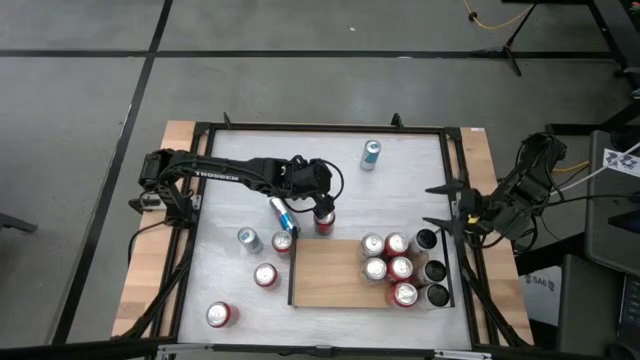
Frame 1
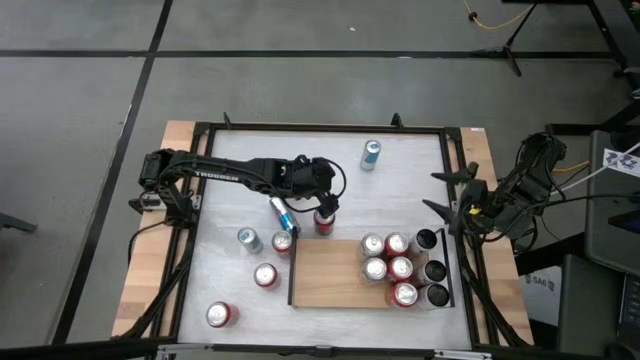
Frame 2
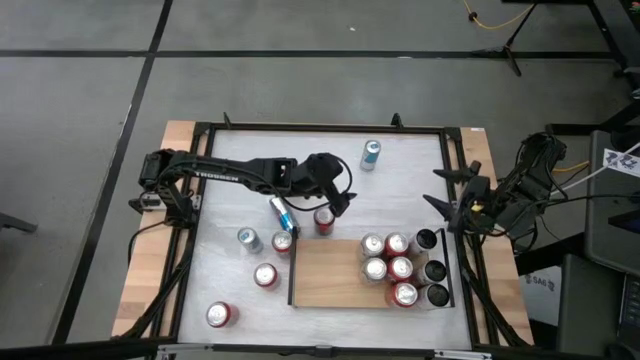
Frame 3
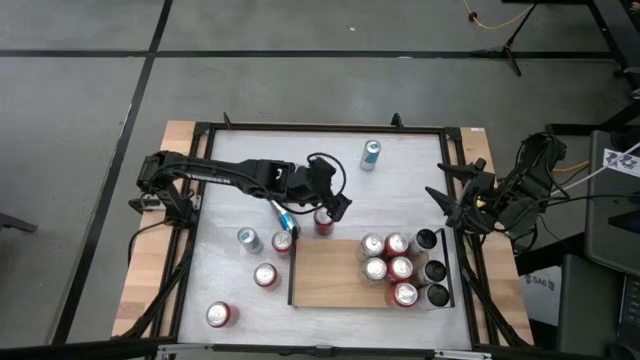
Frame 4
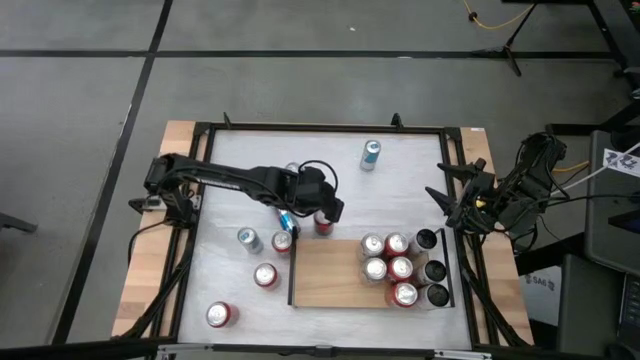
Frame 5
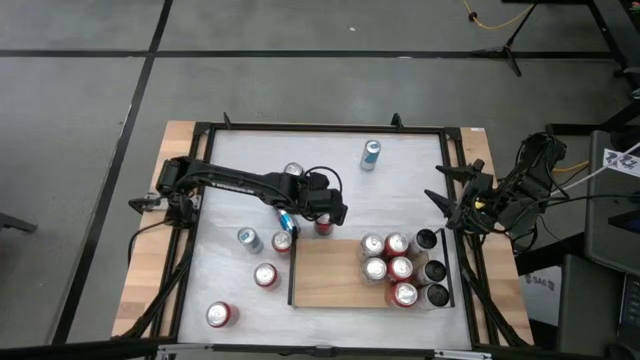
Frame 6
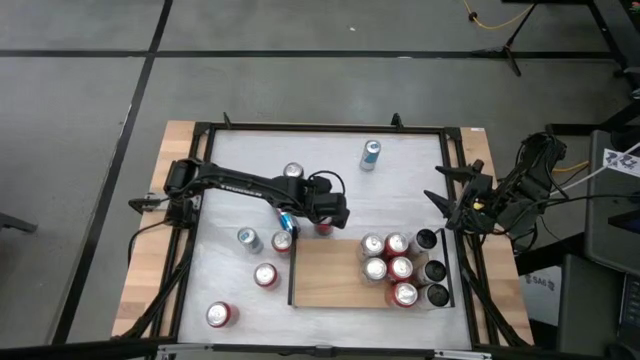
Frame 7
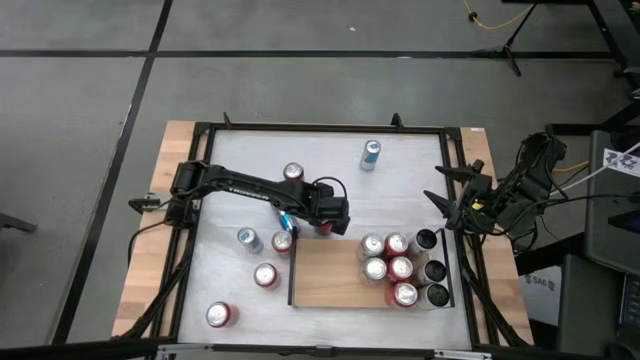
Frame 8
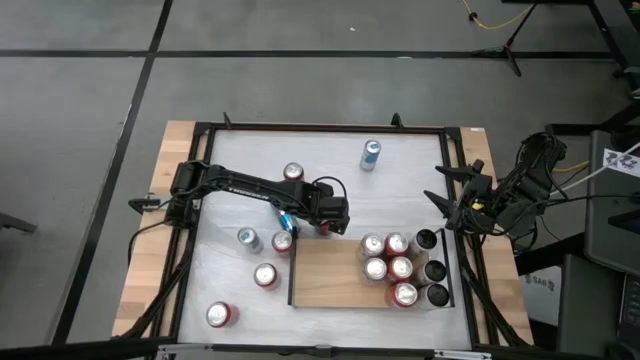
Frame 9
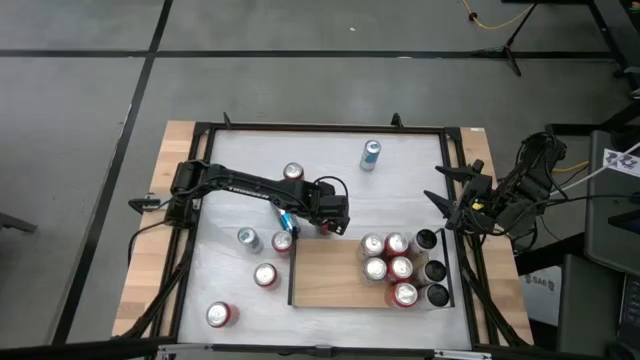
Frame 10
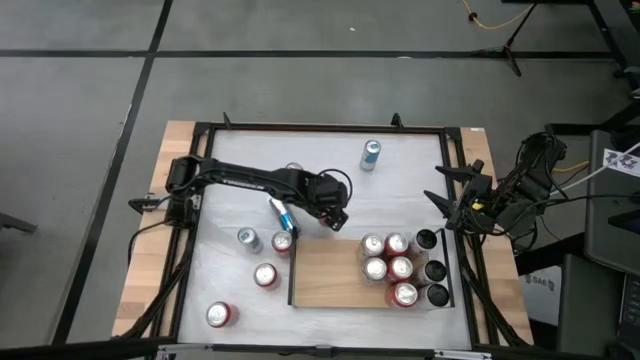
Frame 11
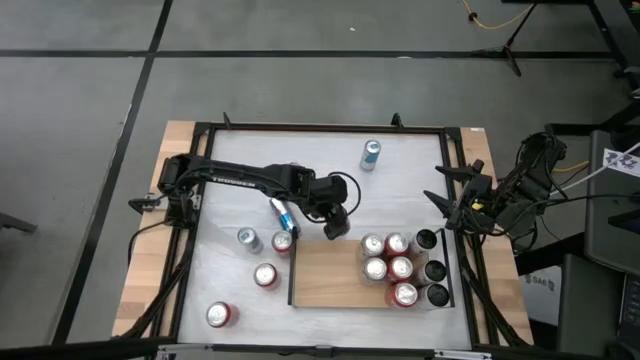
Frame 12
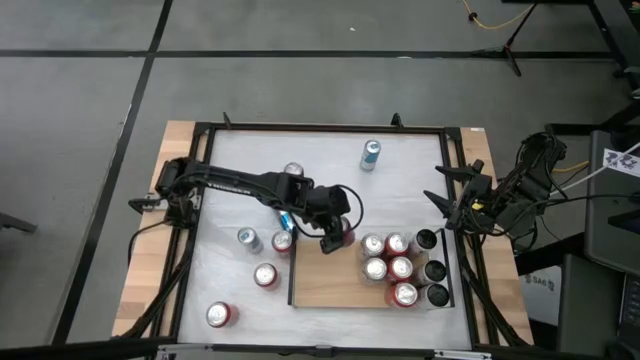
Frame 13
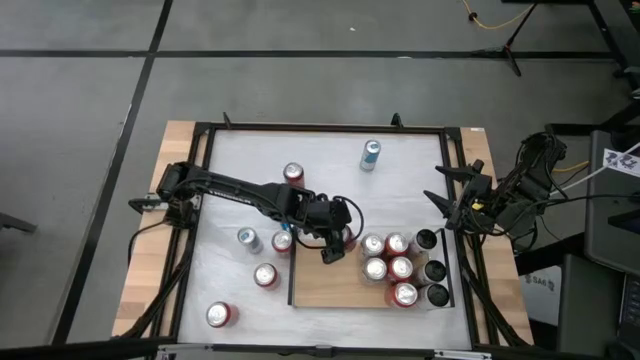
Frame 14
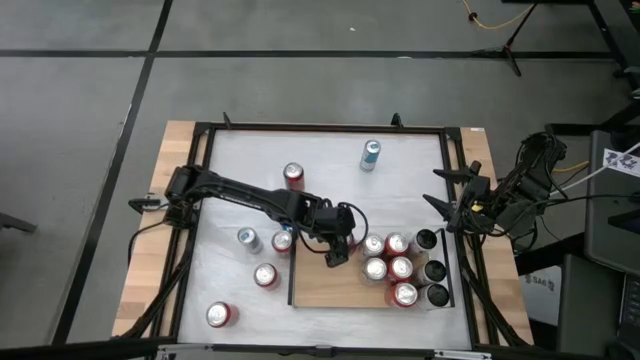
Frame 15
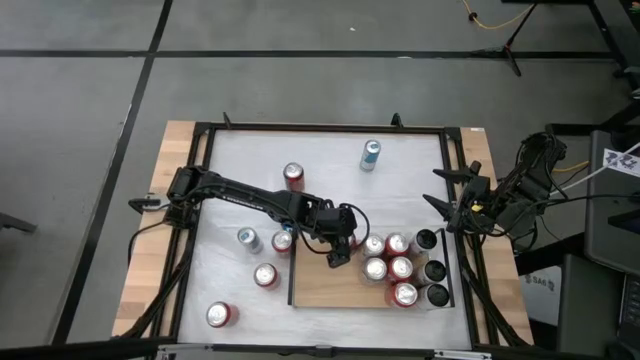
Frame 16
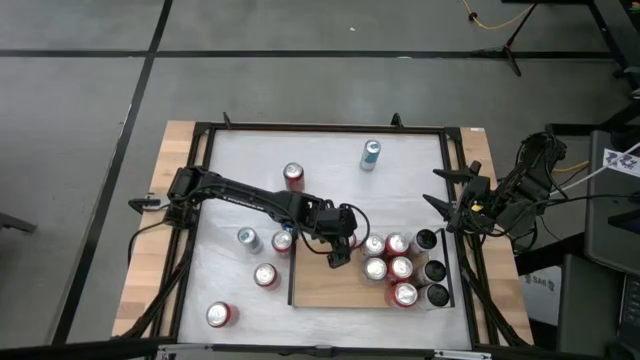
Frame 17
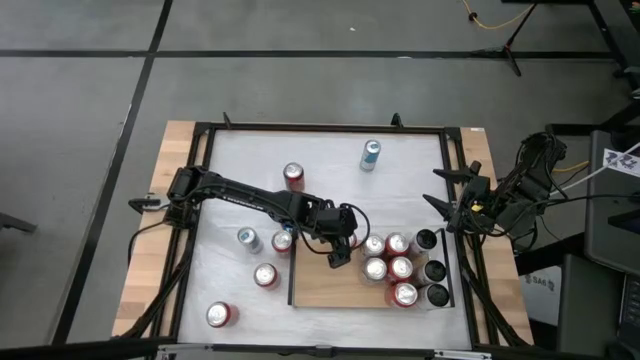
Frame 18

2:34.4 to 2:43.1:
Task: Place canned beverage on shelf
Put the center right red soda can on the shelf

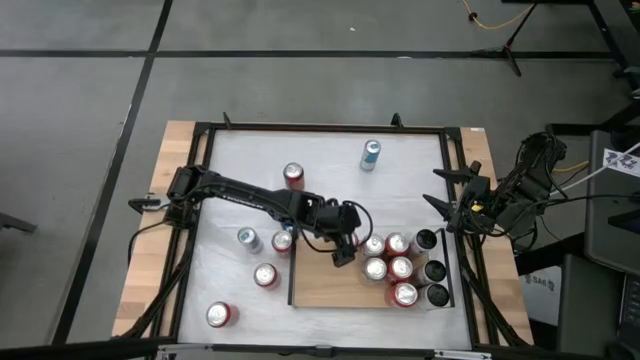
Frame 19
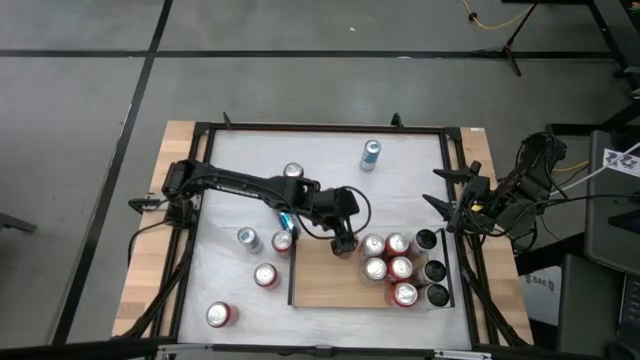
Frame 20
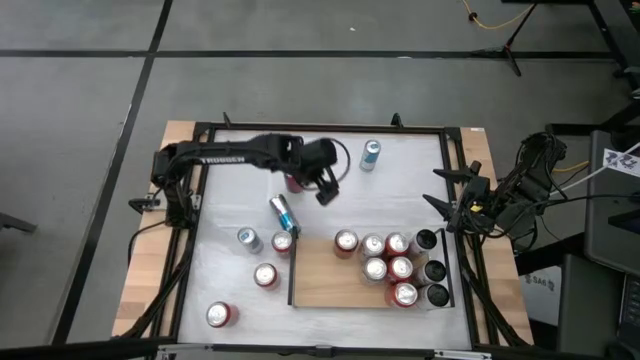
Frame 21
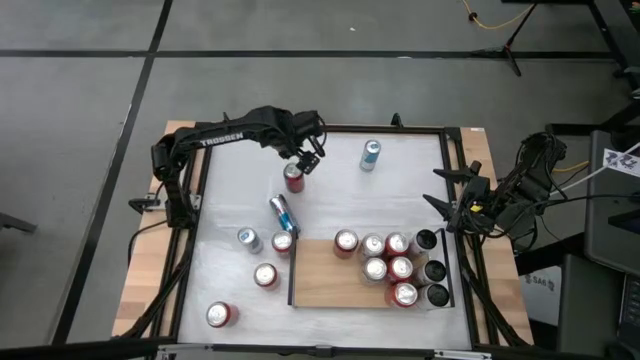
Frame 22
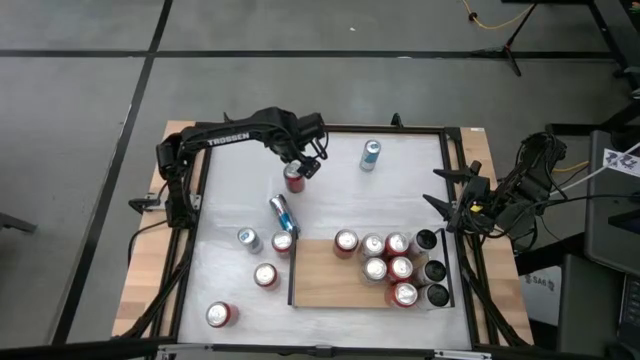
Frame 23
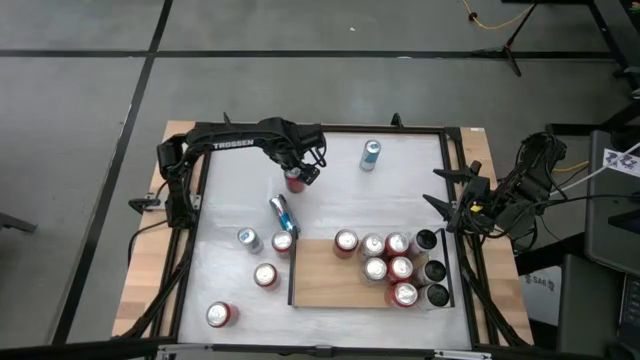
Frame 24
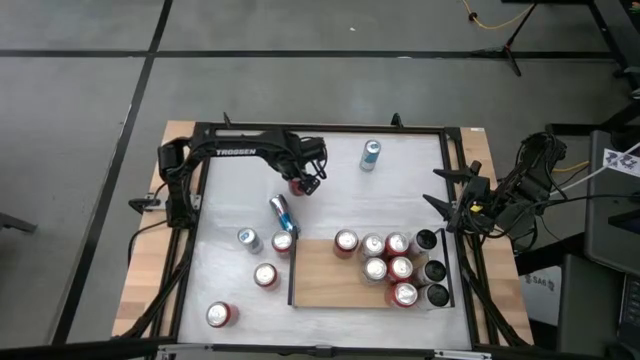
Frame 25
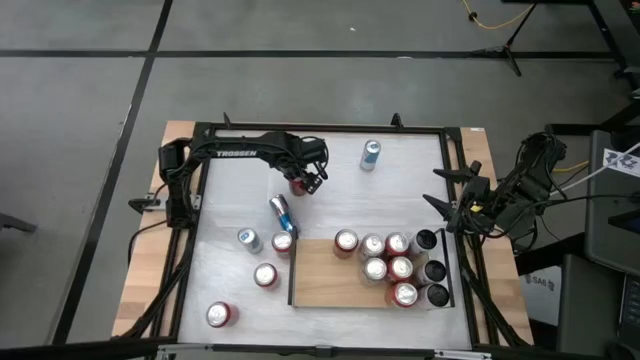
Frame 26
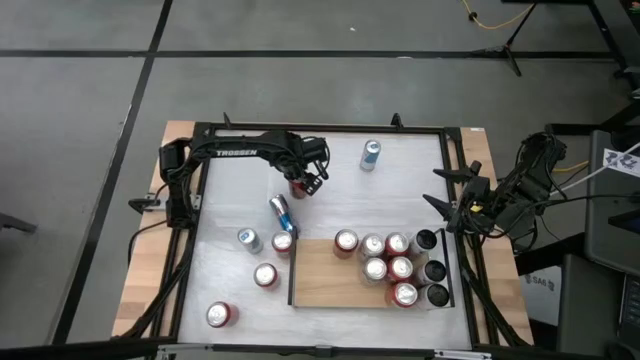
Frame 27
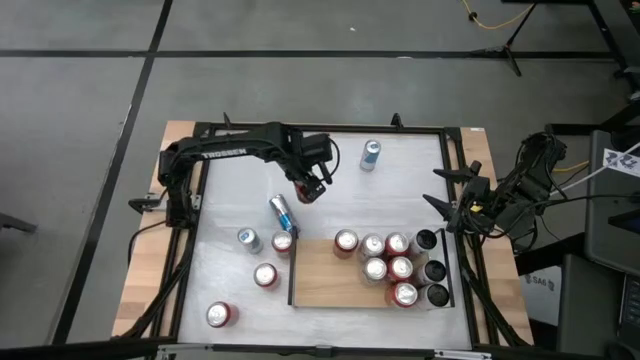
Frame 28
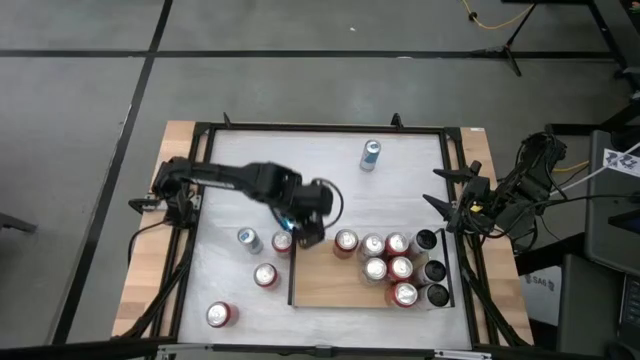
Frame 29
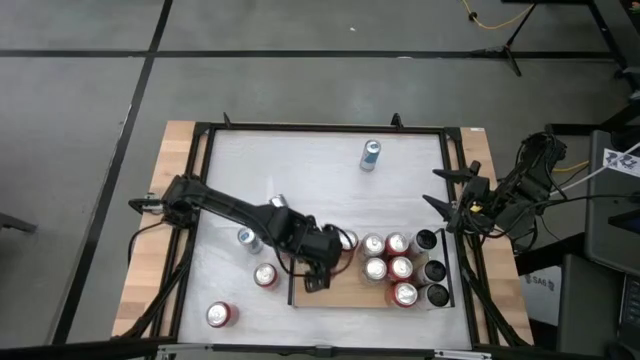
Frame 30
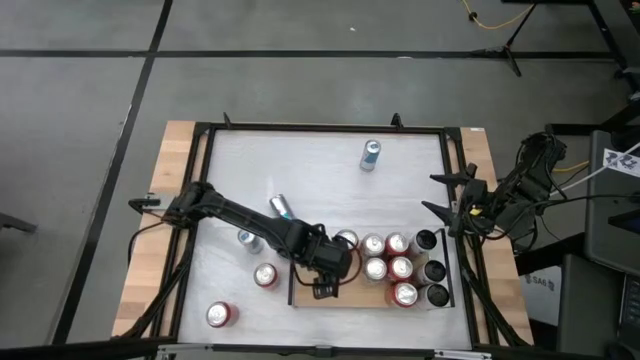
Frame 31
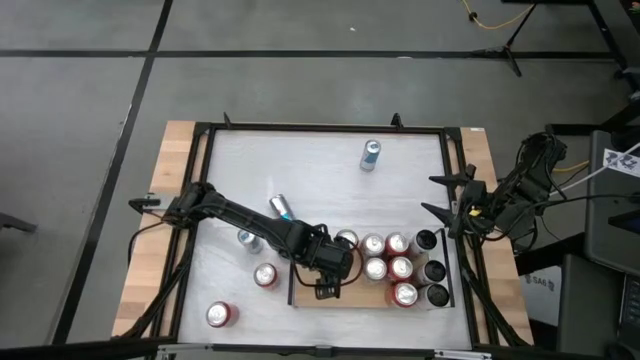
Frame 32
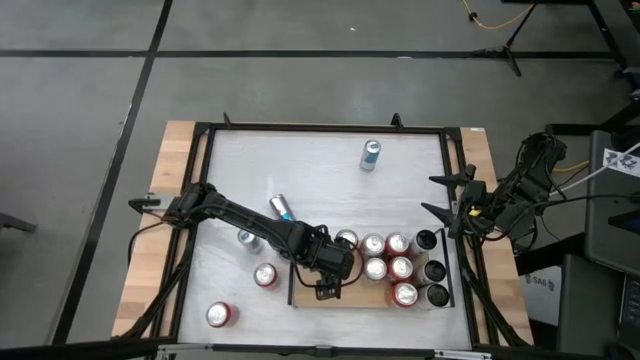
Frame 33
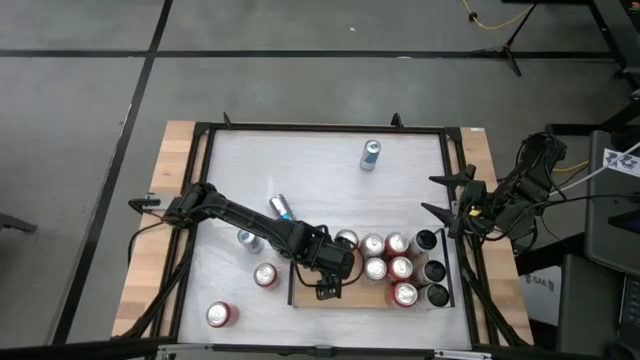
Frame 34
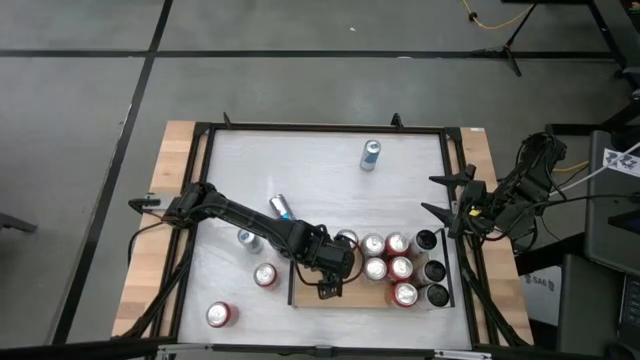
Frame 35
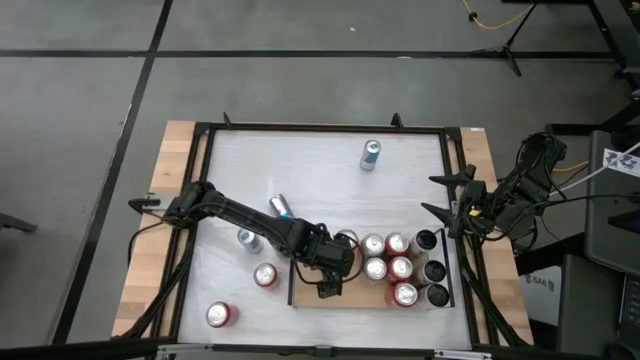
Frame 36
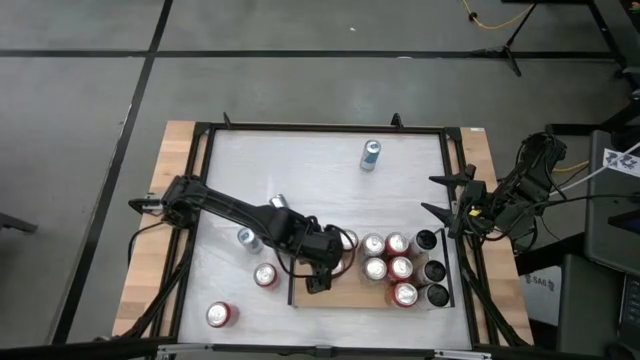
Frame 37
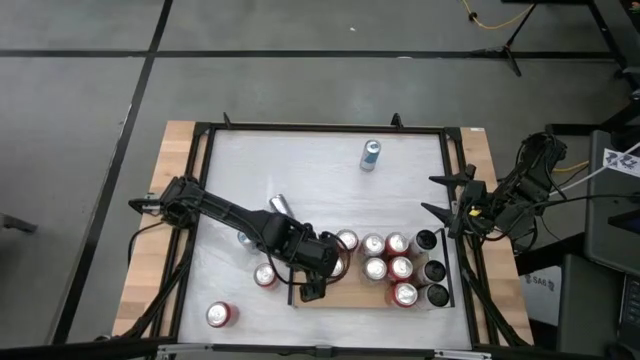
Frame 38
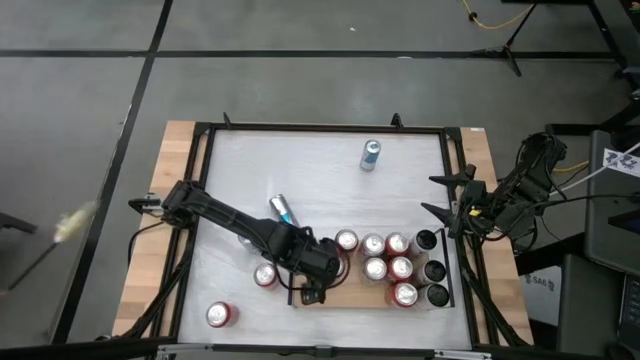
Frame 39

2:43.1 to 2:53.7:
Put the top red soda can on the shelf

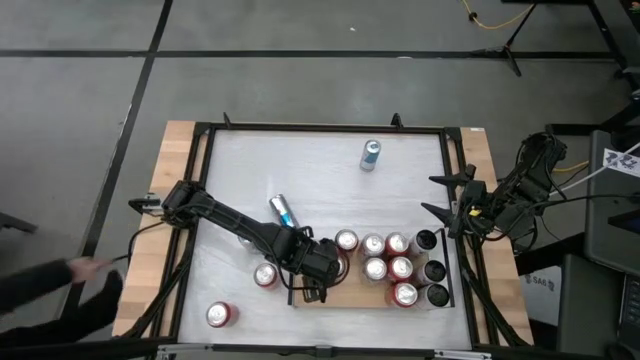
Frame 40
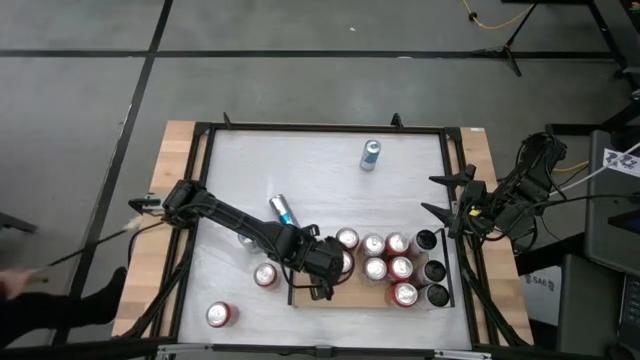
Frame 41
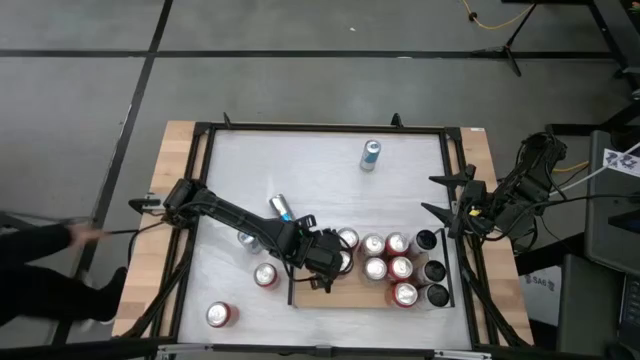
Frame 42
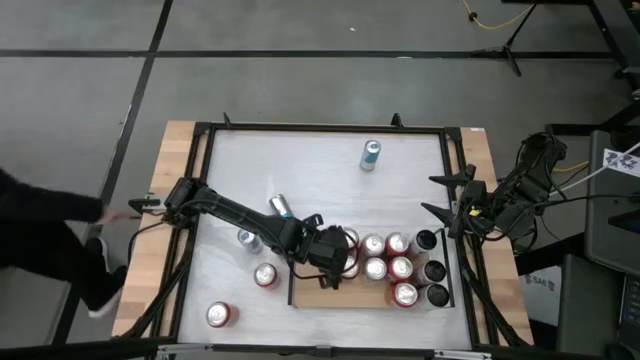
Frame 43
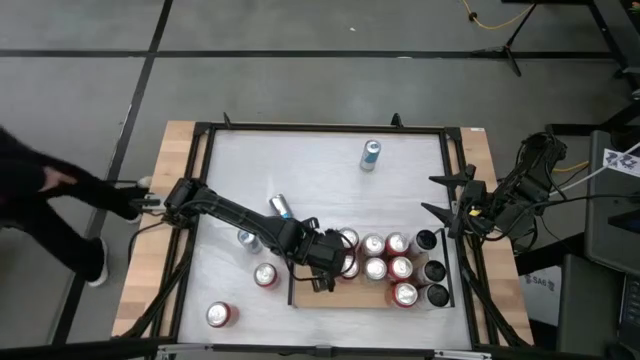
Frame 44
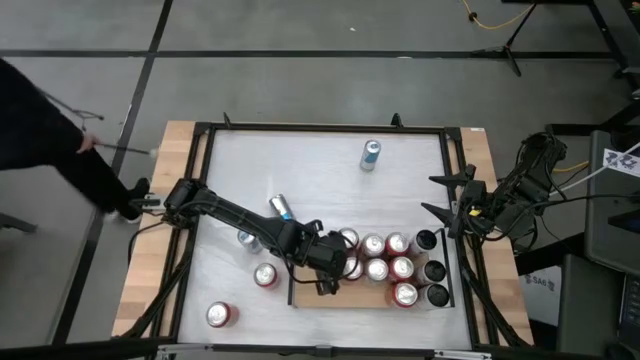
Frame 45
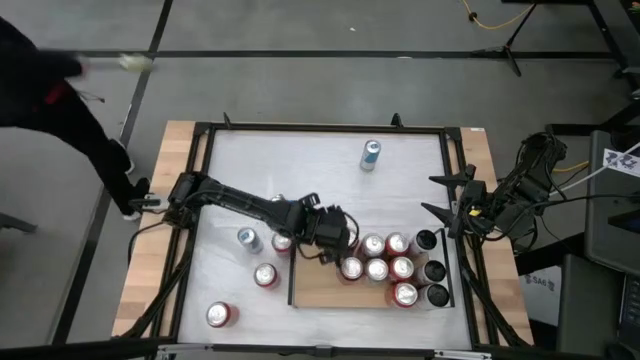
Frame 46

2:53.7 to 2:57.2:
Adjust the bottom left red soda can on the shelf

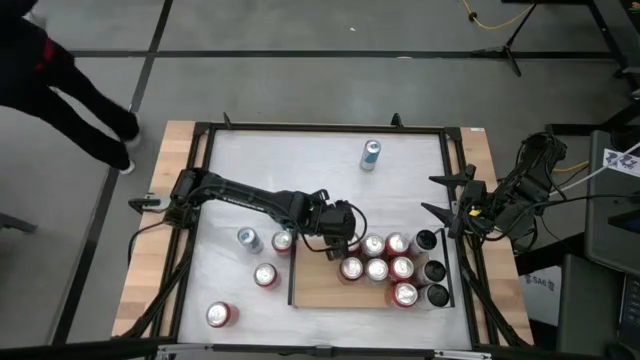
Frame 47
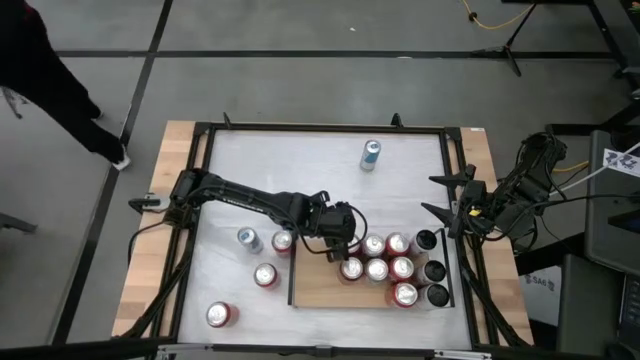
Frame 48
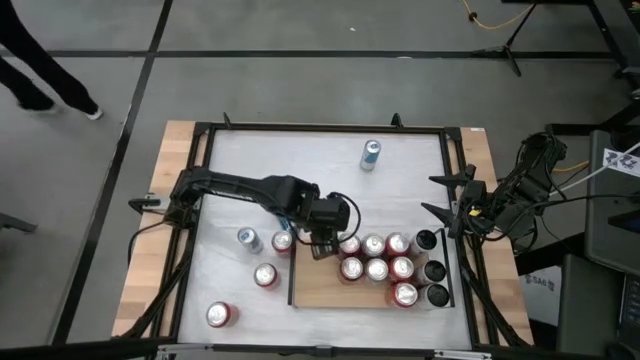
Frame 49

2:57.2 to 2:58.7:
Adjust the top left soda can on the shelf
